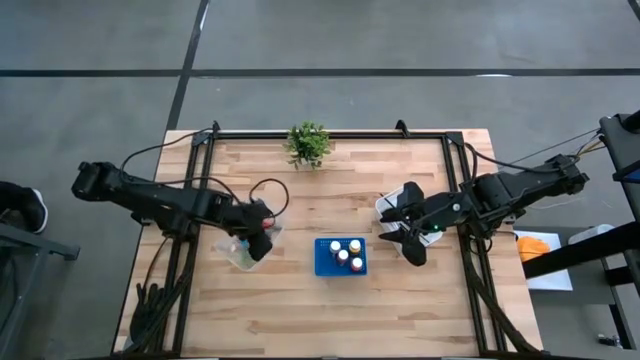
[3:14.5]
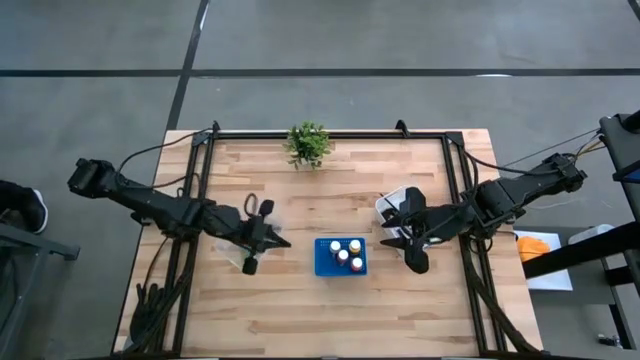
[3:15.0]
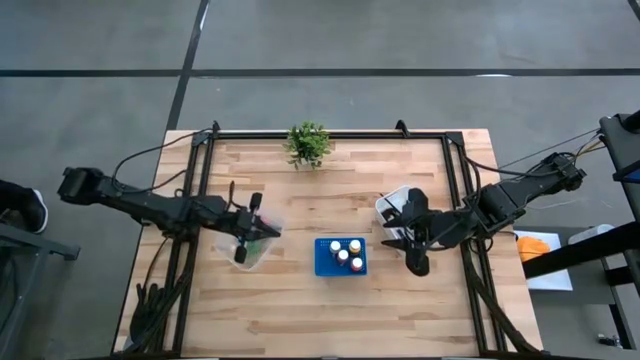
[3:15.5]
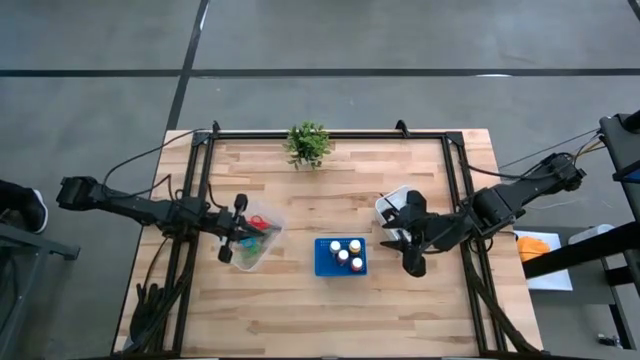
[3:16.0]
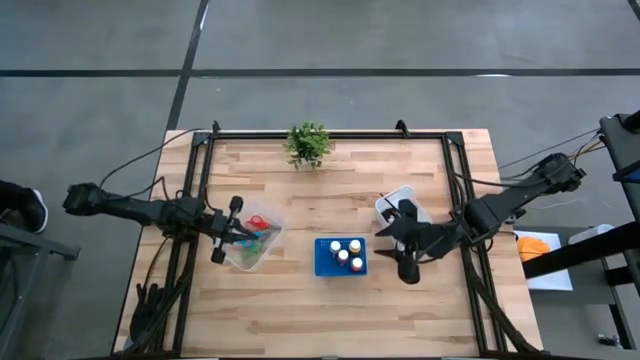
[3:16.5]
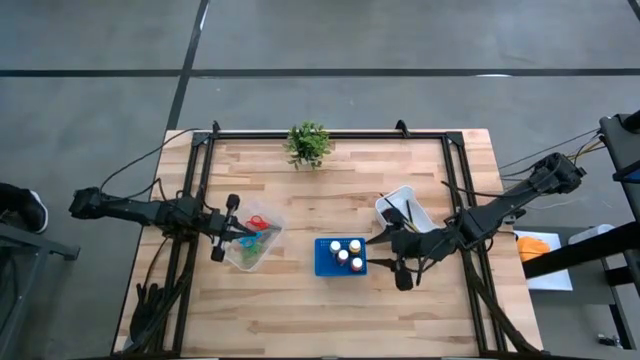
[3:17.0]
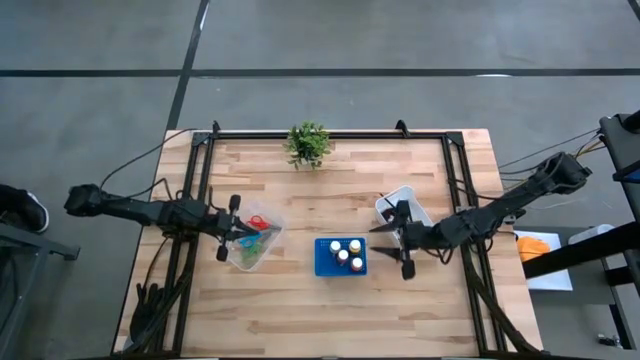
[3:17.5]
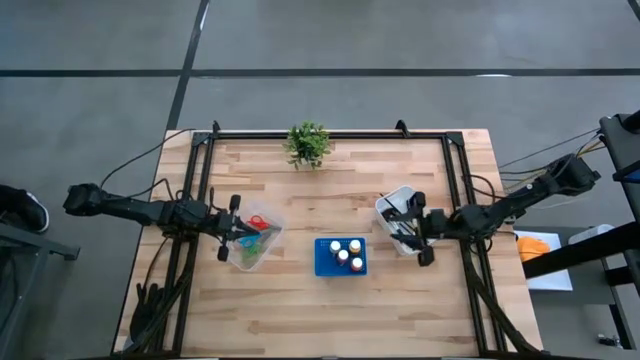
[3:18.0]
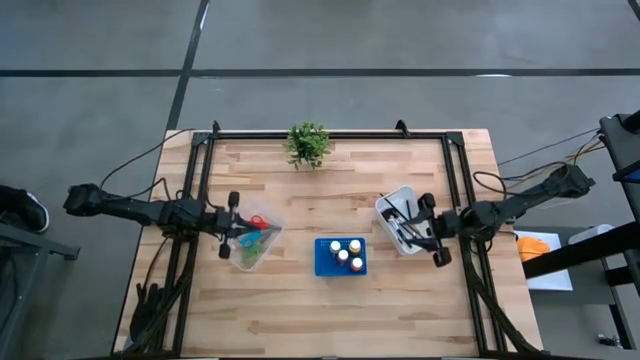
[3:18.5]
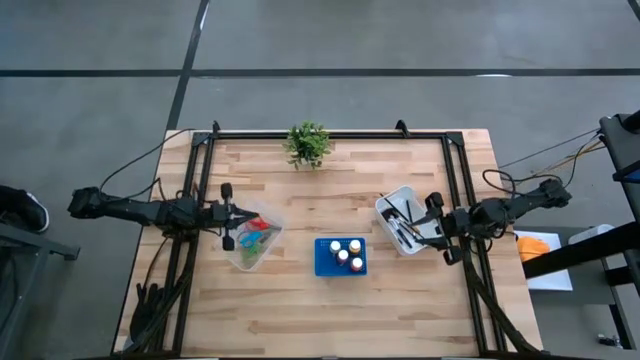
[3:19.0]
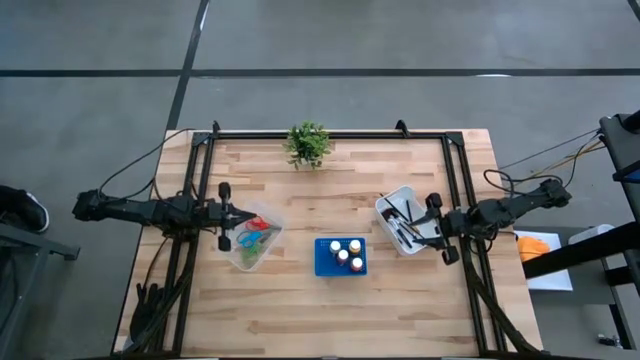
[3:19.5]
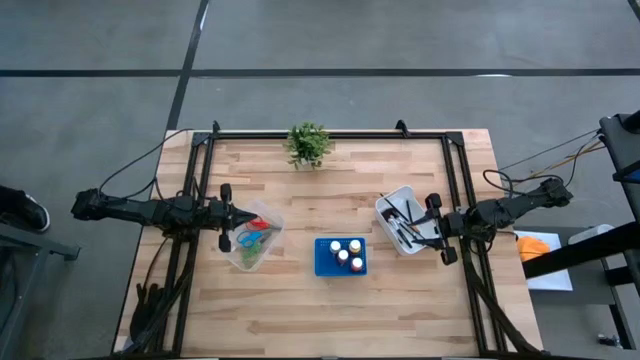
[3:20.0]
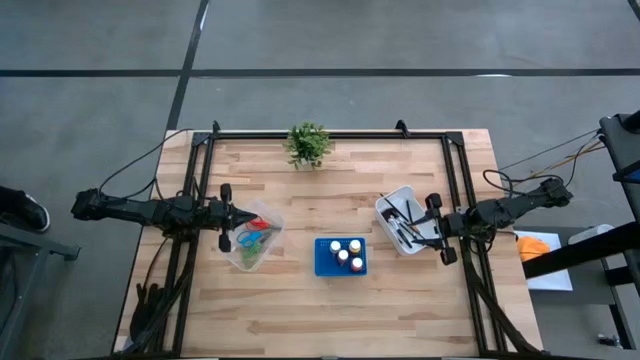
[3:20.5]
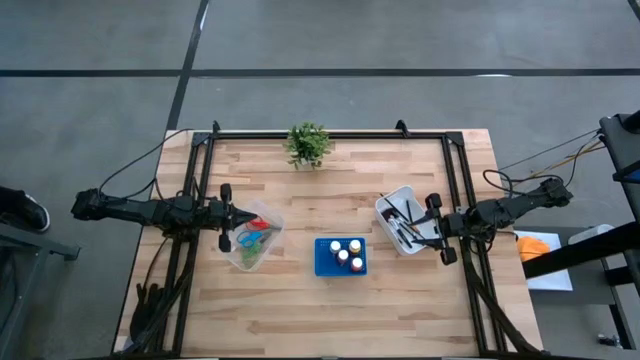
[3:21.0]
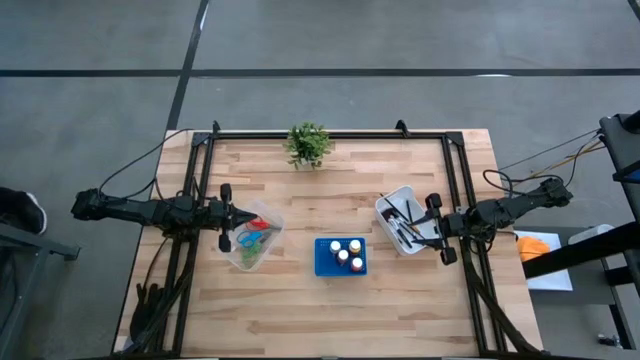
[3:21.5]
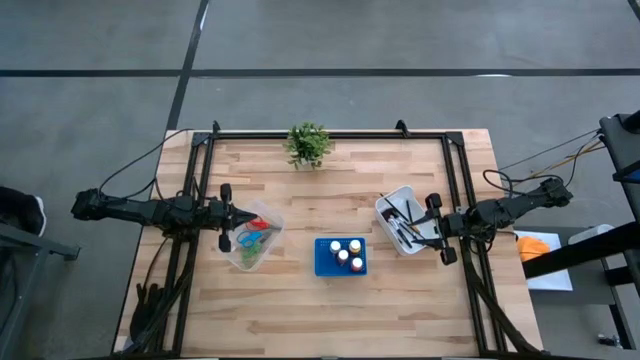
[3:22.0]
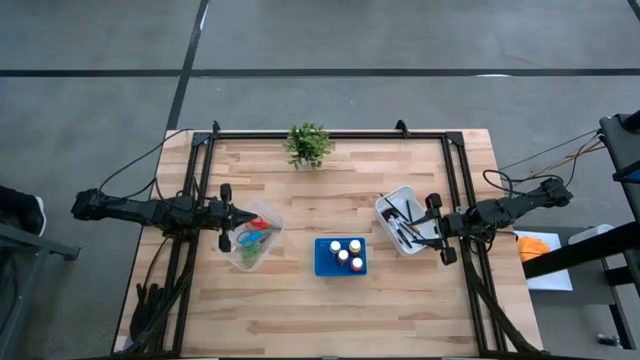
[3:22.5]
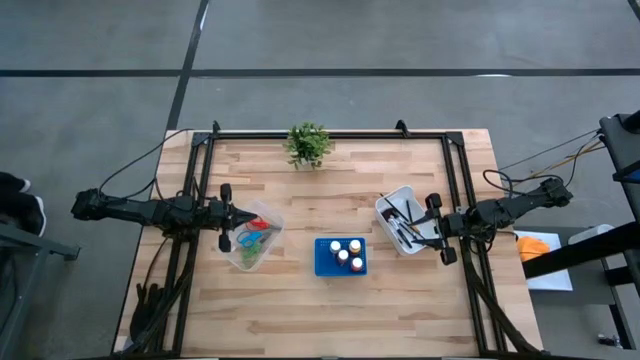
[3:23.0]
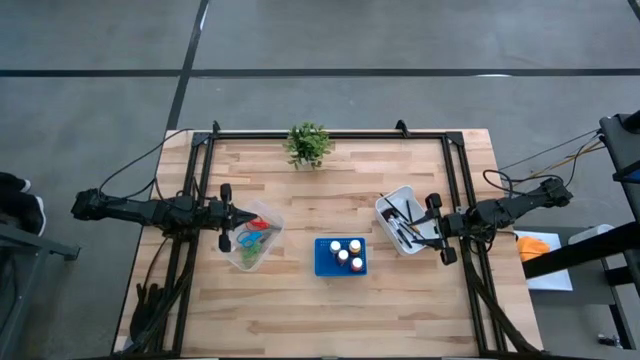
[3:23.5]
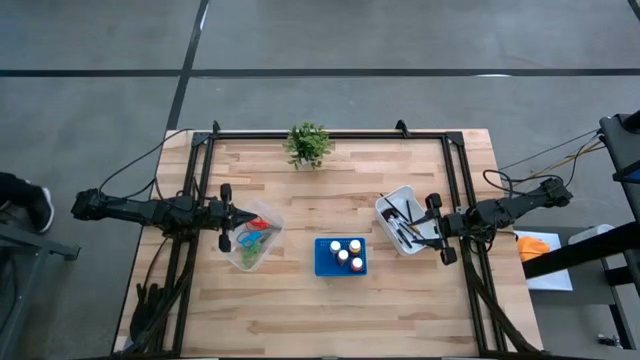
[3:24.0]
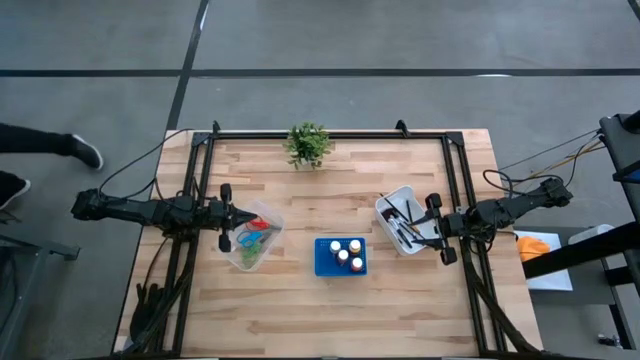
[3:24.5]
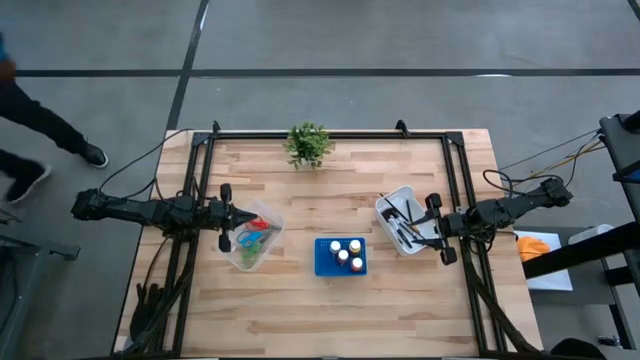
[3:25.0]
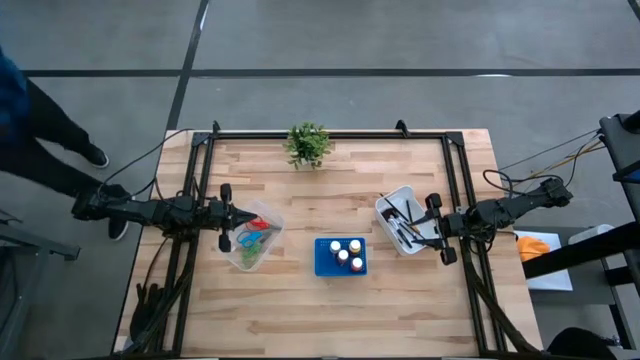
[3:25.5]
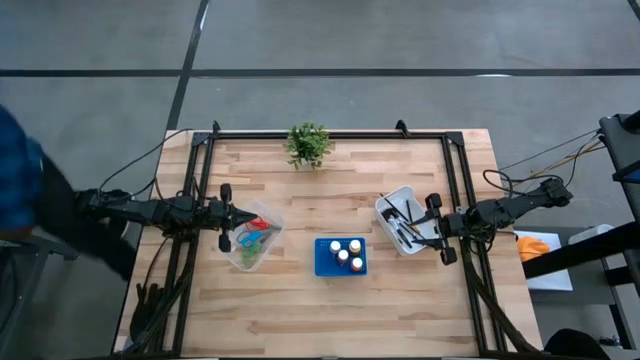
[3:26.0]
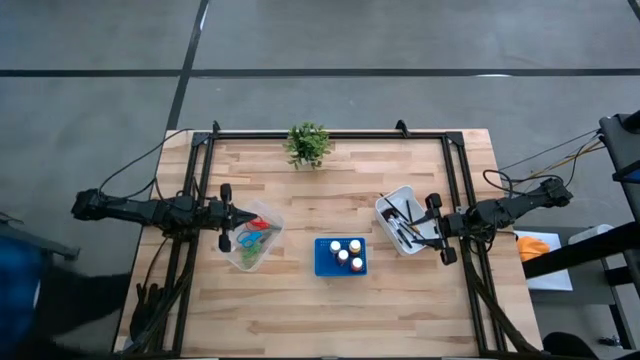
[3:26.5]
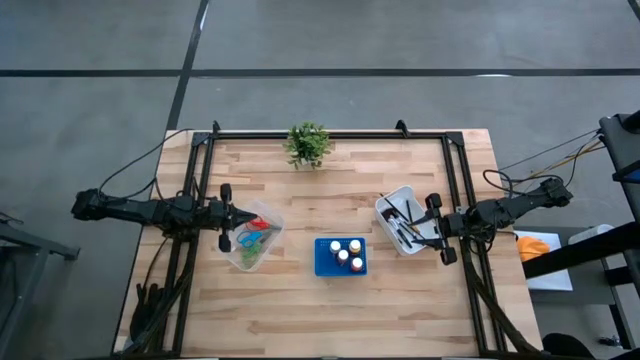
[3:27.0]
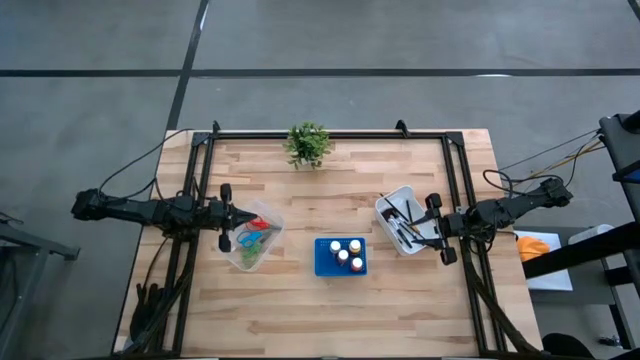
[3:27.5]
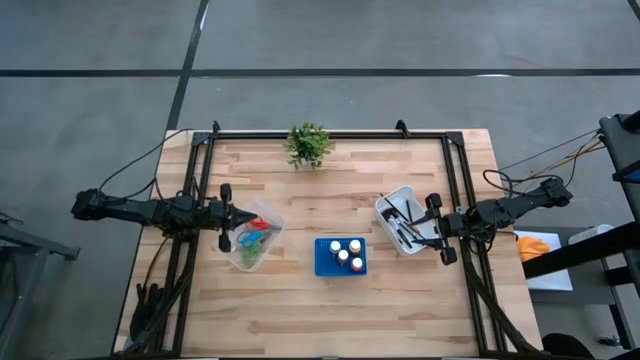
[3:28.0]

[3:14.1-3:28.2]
Task: Pick & Place Paint Supplies
Return to Home Position

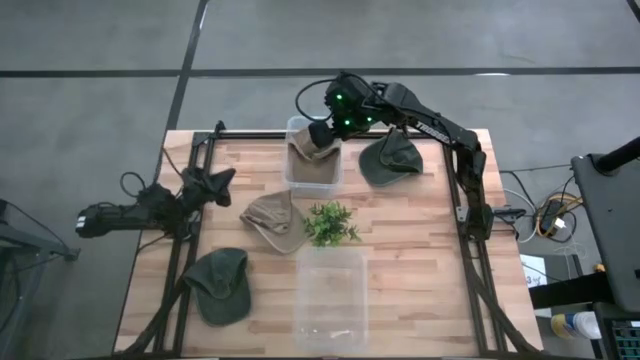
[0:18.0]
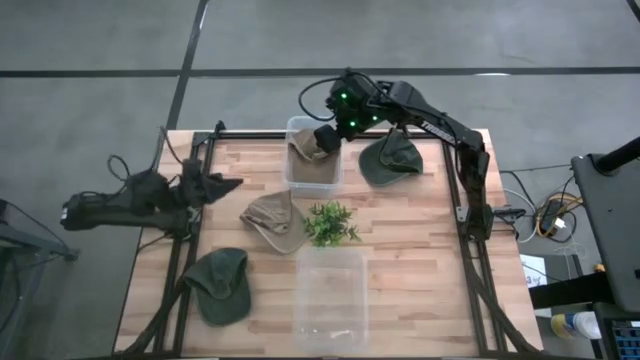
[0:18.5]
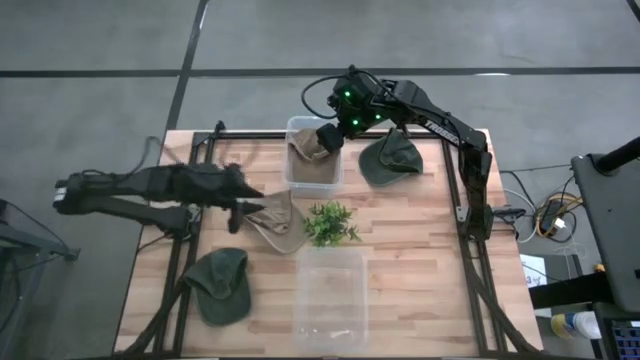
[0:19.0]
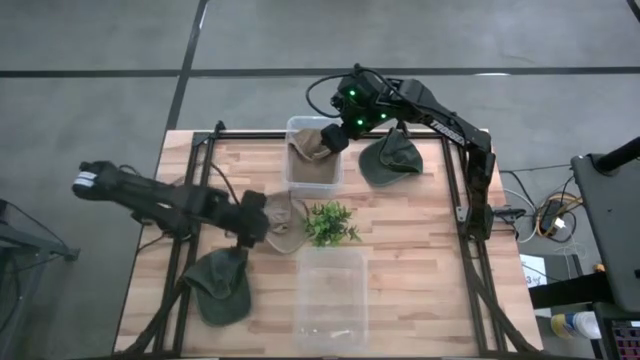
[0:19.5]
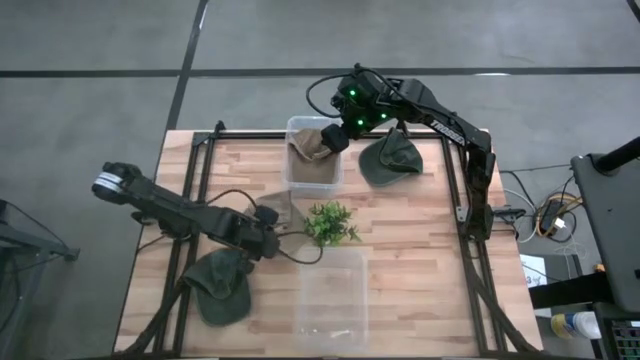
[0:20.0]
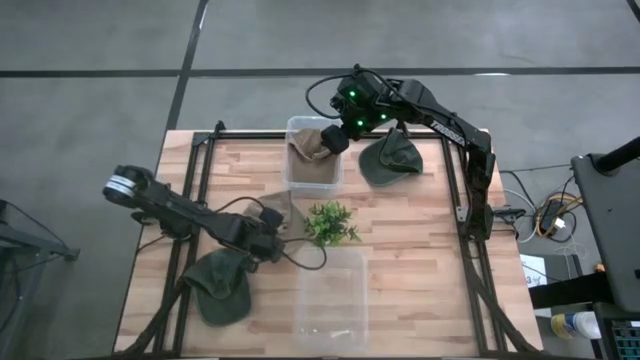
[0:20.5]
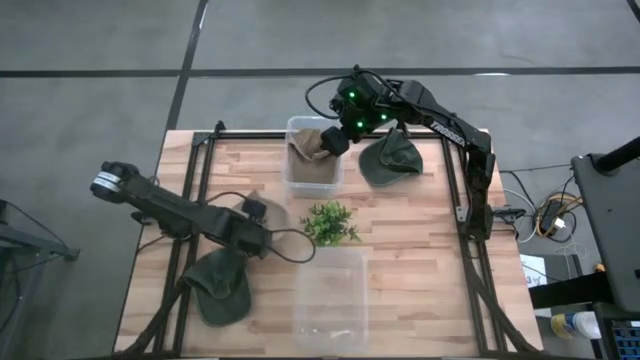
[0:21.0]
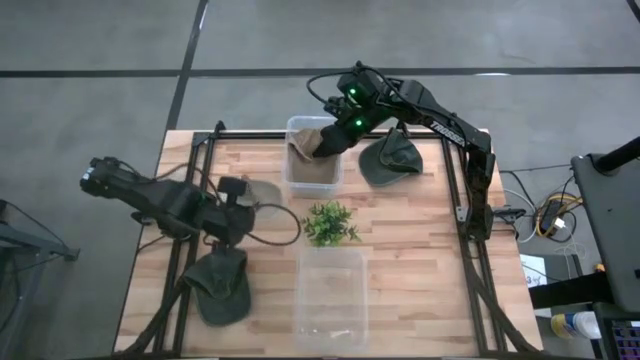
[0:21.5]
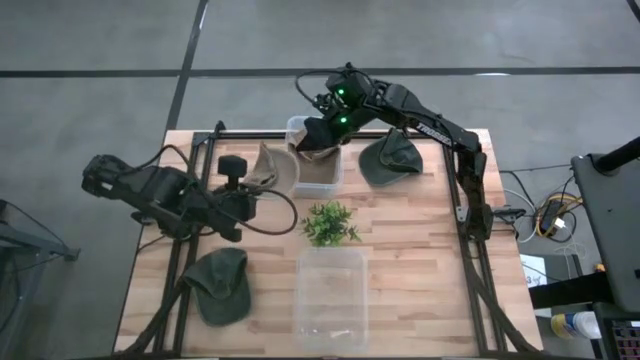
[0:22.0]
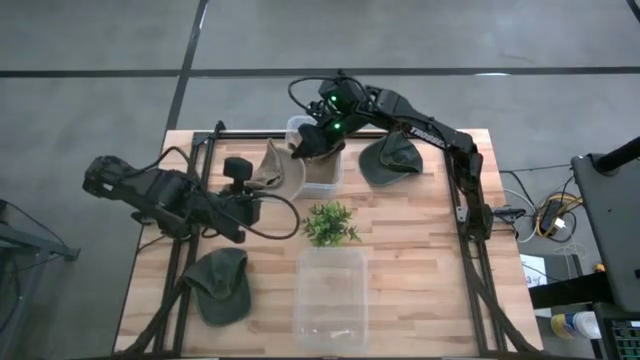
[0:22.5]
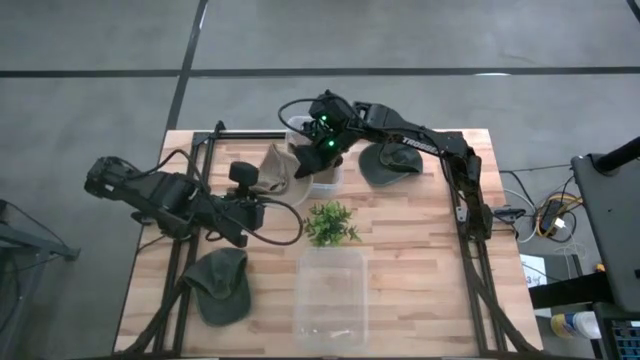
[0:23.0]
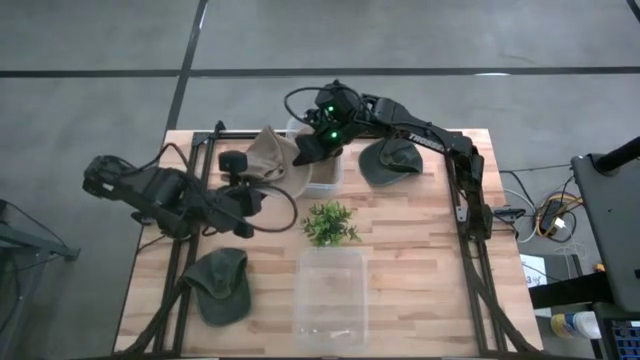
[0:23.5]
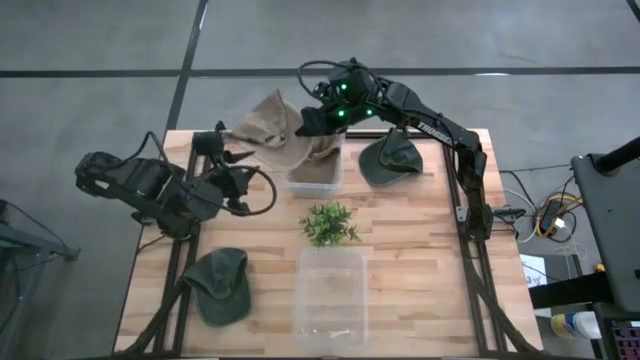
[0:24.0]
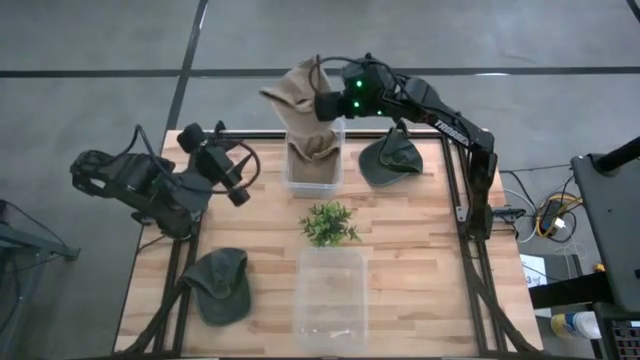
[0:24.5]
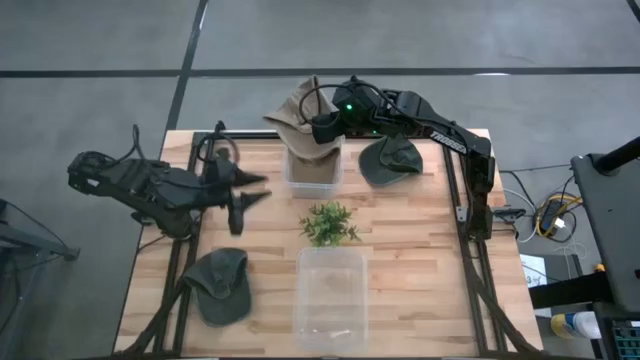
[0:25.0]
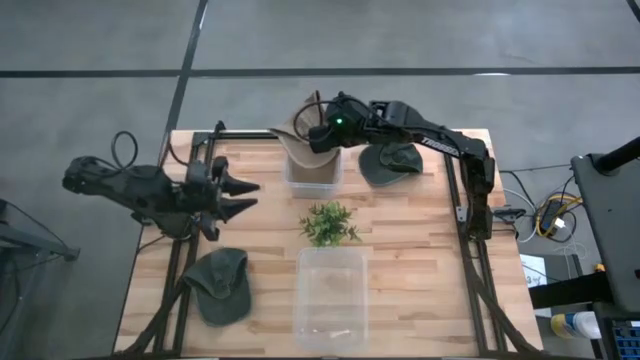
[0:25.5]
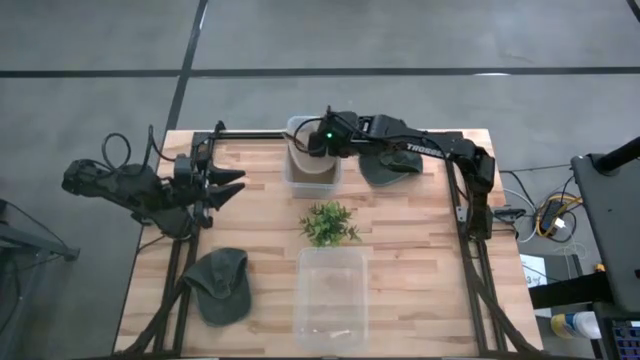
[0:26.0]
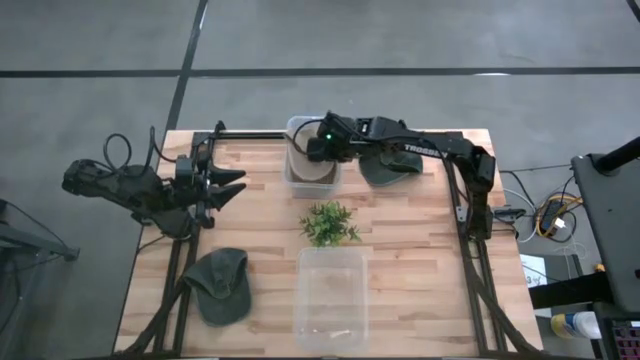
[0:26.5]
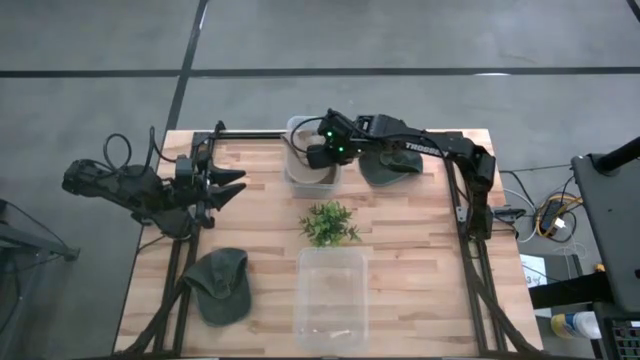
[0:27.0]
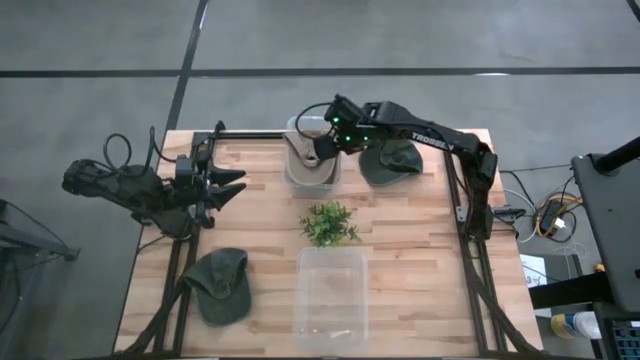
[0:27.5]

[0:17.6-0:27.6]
Task: Pick & Place hat
Put the brown cap into the top transparent bin
